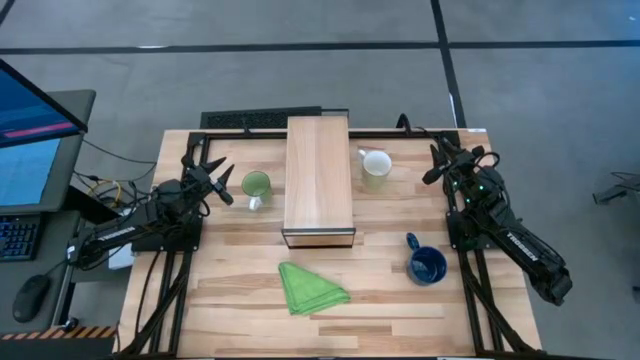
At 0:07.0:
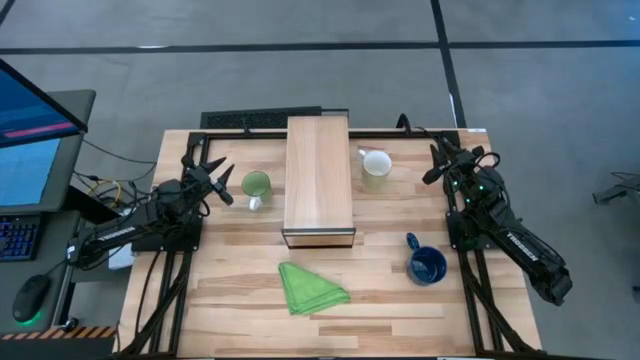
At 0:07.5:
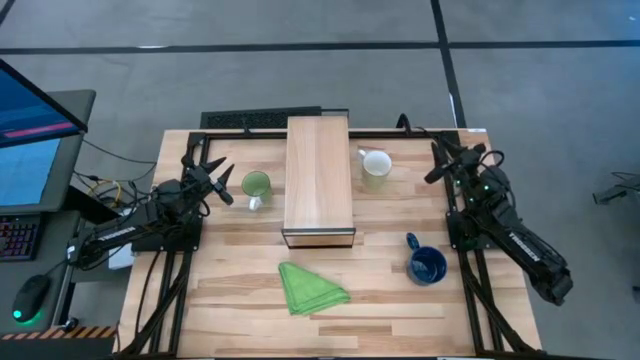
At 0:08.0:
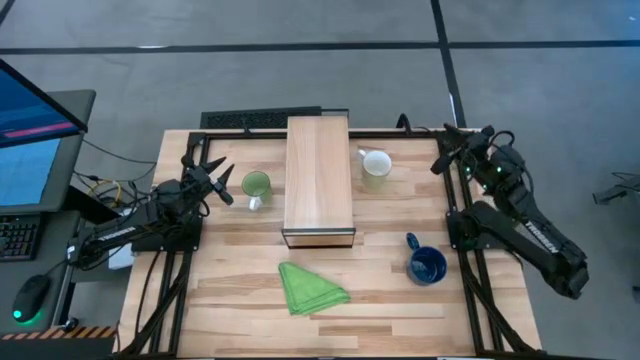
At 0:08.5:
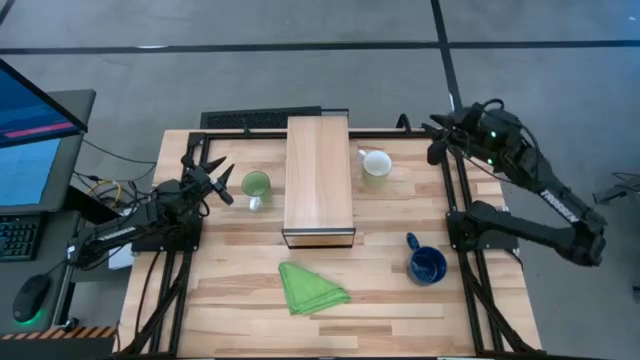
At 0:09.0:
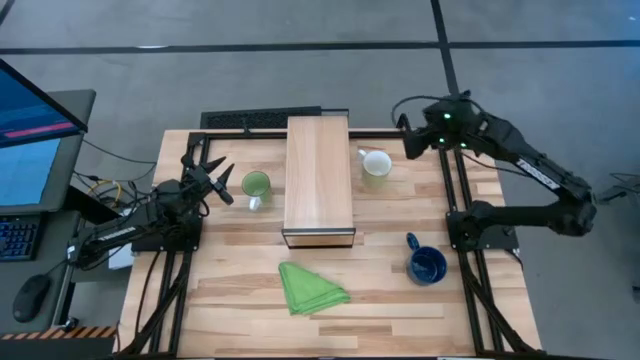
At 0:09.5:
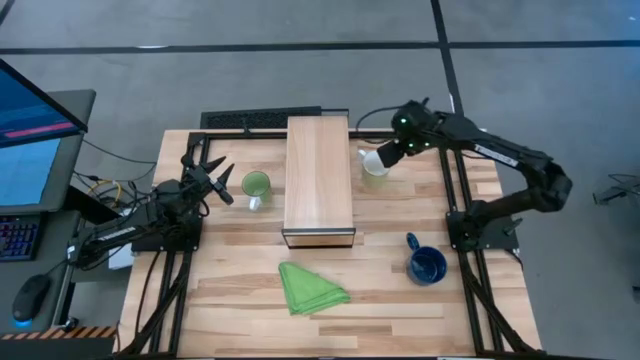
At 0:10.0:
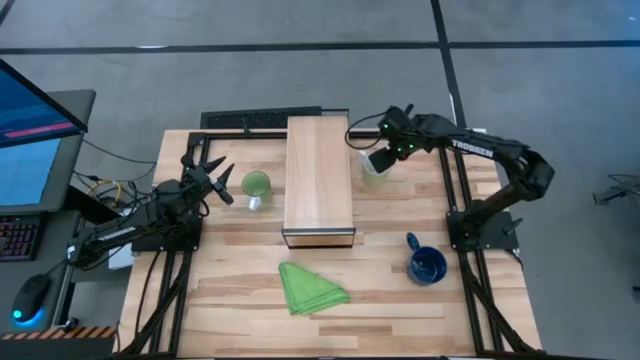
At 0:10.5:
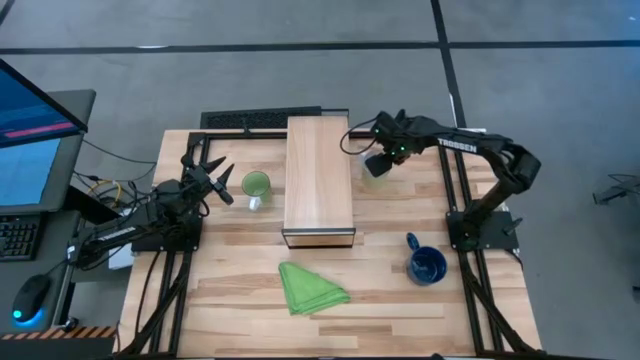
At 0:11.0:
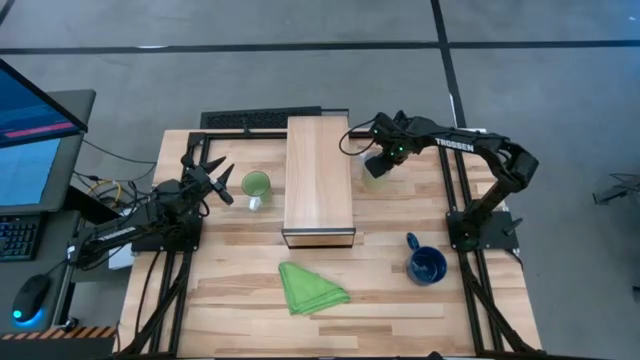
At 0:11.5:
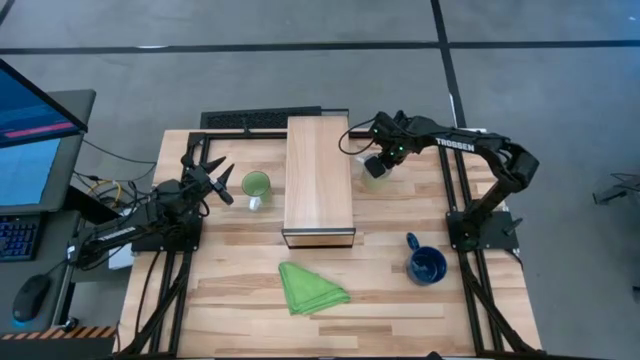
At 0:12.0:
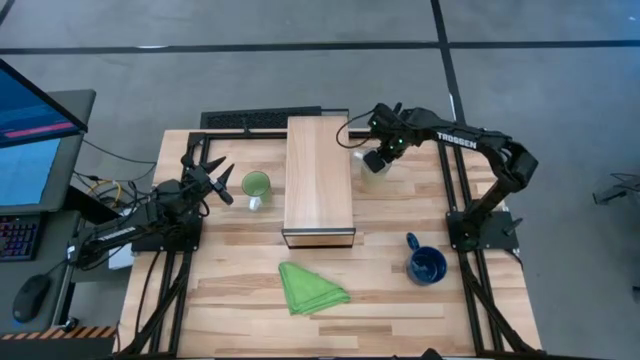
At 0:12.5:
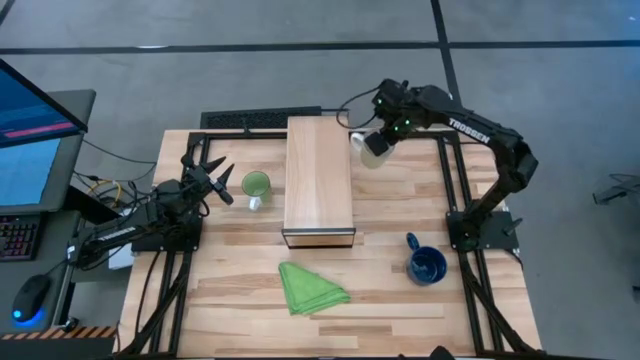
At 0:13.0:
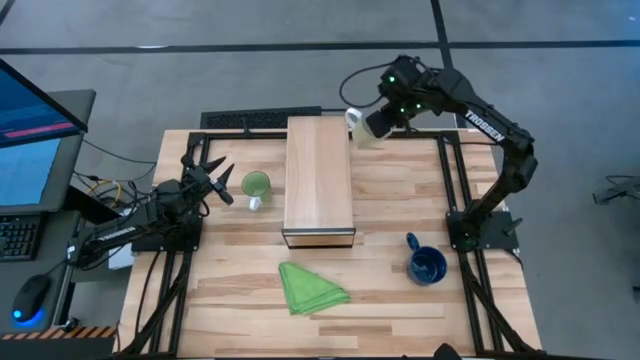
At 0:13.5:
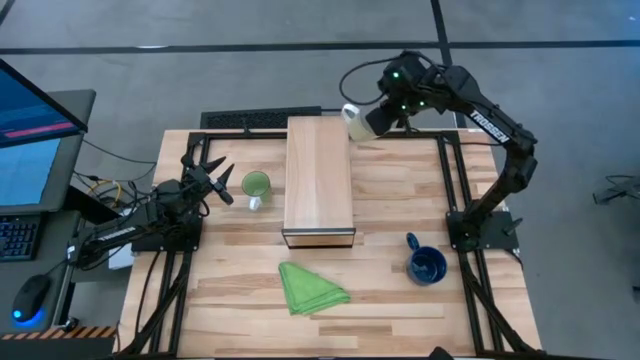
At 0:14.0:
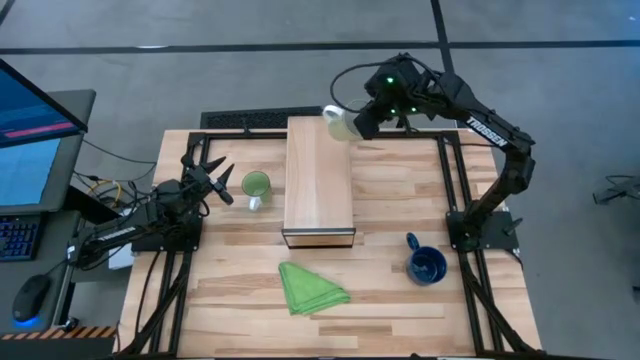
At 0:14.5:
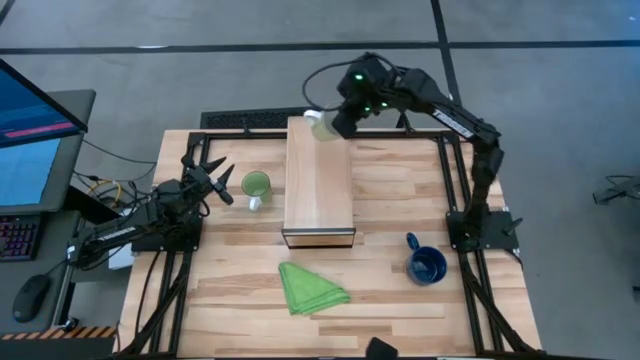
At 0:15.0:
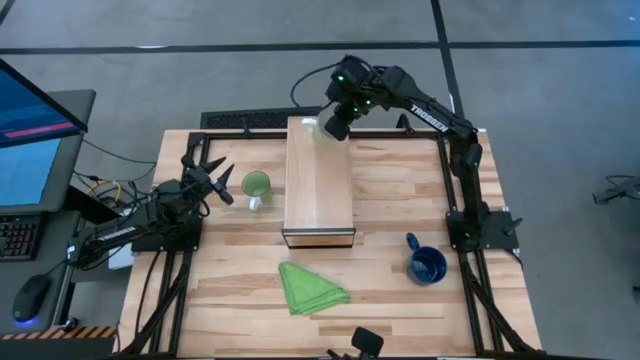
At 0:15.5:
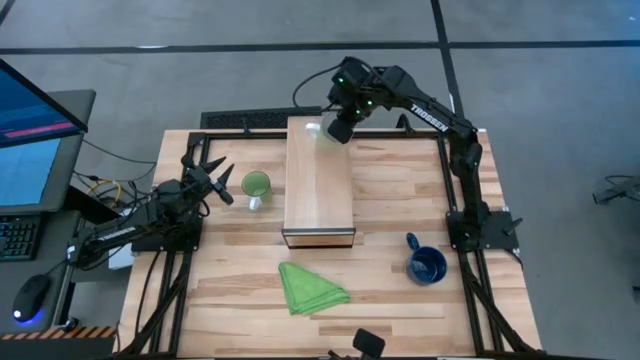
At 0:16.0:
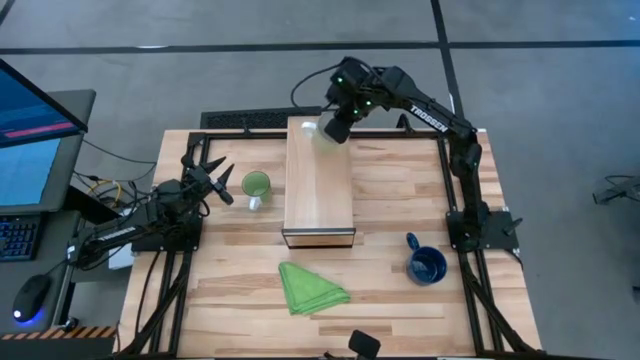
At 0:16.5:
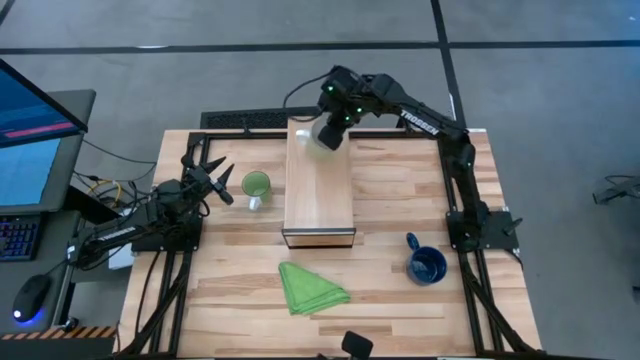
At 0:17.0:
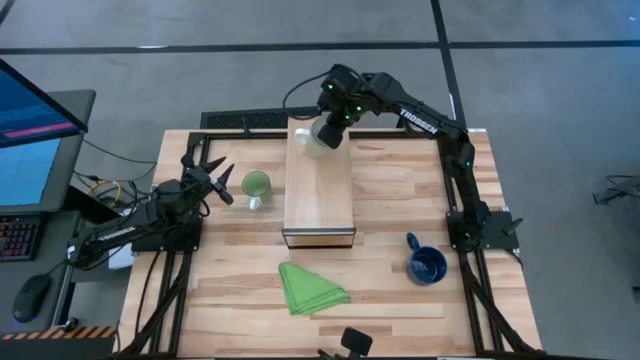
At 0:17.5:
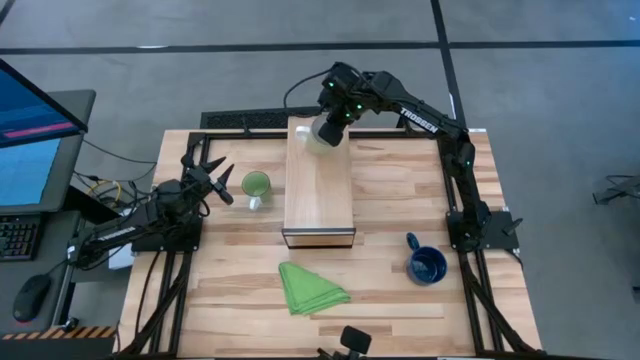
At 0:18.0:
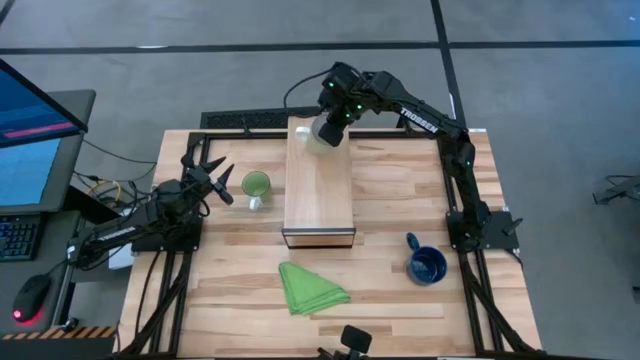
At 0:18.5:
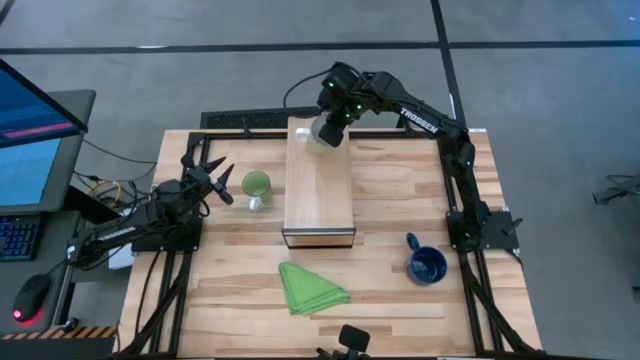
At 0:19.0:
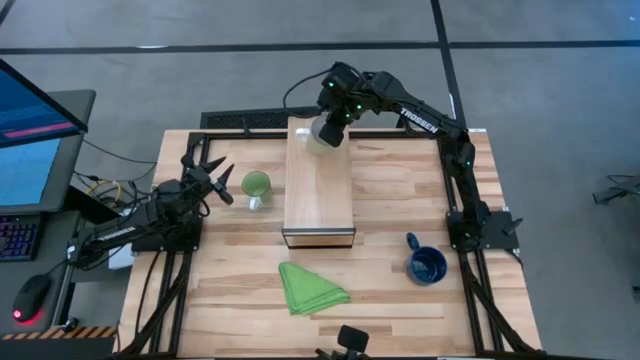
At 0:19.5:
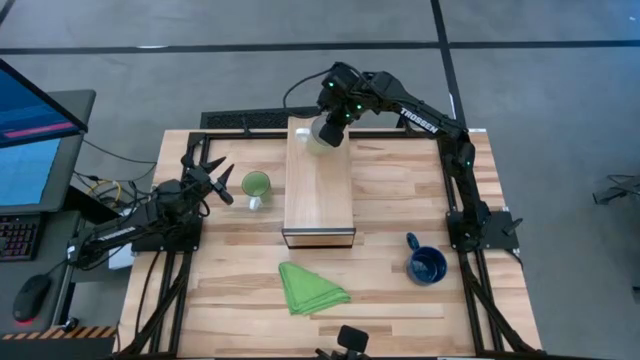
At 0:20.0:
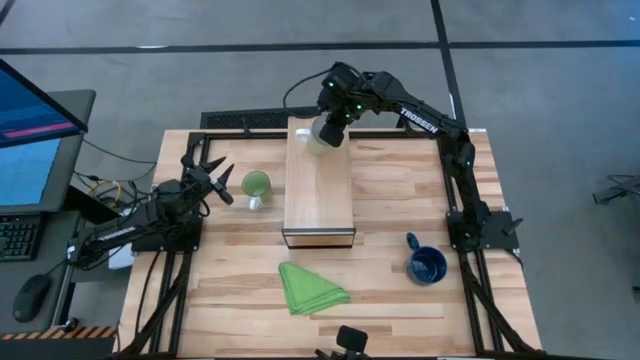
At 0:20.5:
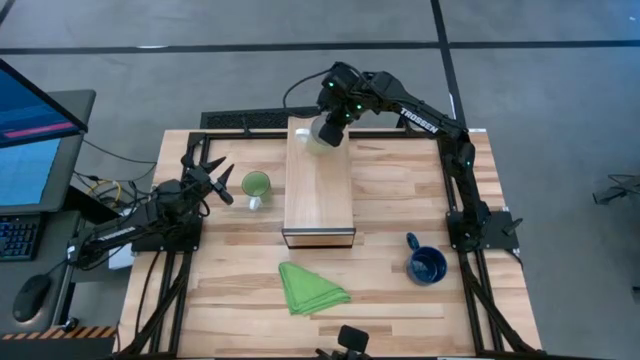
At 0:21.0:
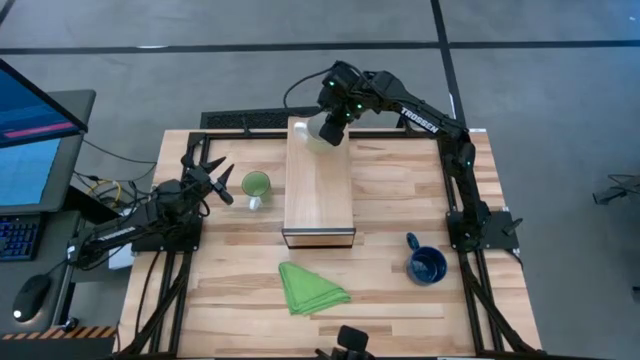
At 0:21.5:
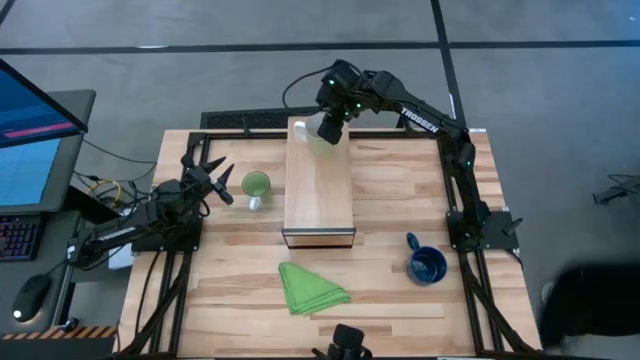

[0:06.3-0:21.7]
Task: Stack small to large cups/mugs on shelf
Put the light green mug on the shelf

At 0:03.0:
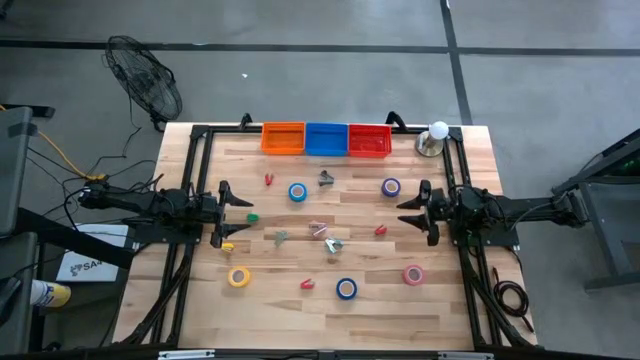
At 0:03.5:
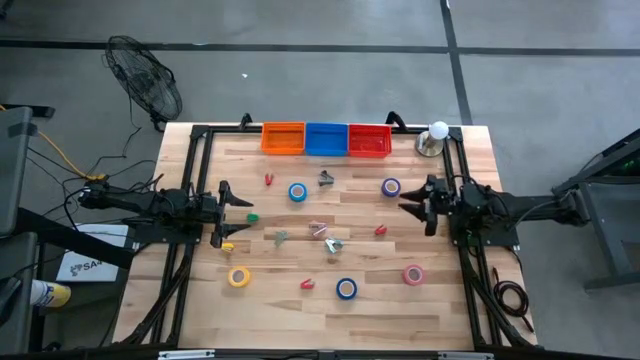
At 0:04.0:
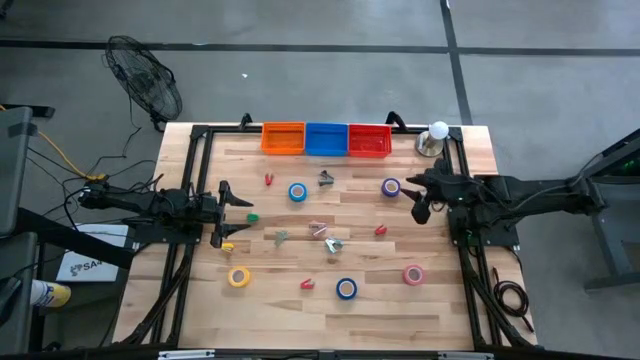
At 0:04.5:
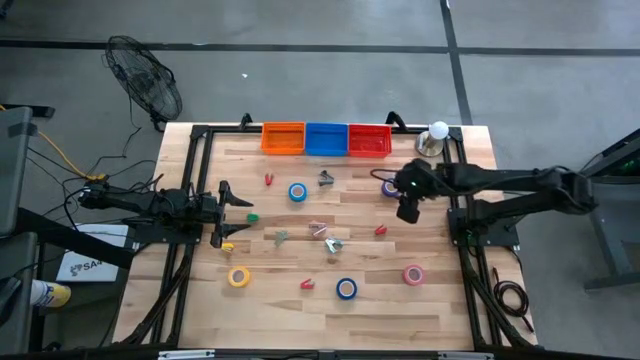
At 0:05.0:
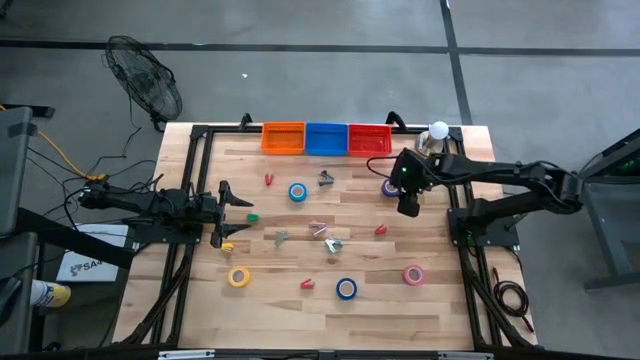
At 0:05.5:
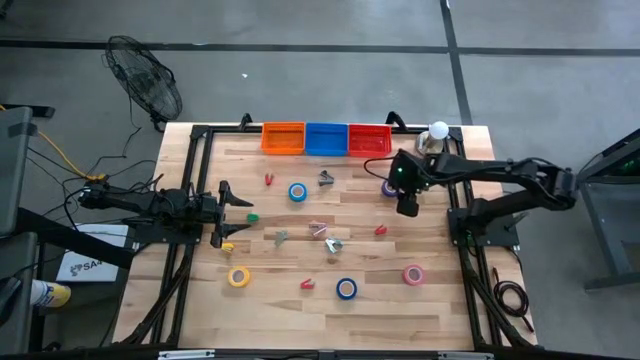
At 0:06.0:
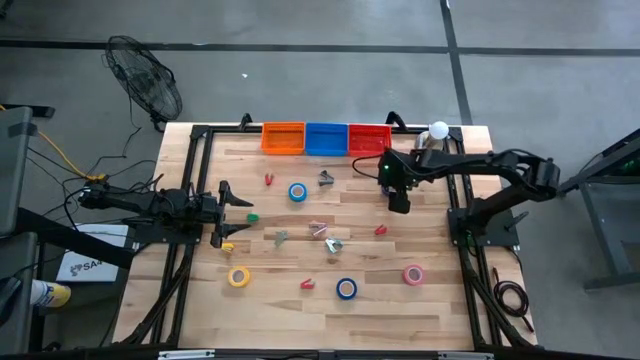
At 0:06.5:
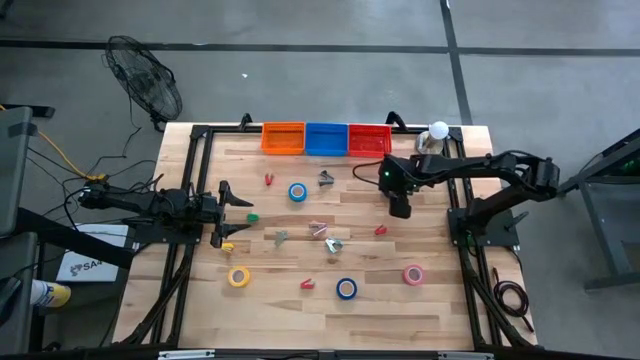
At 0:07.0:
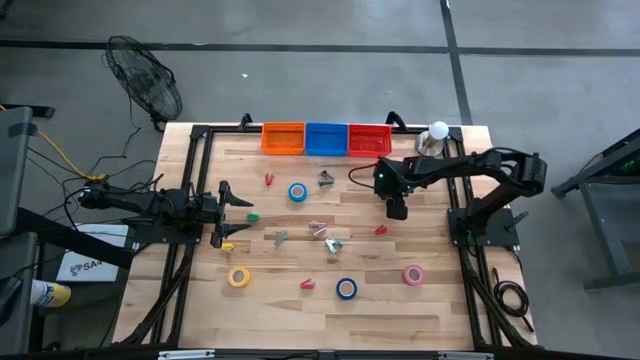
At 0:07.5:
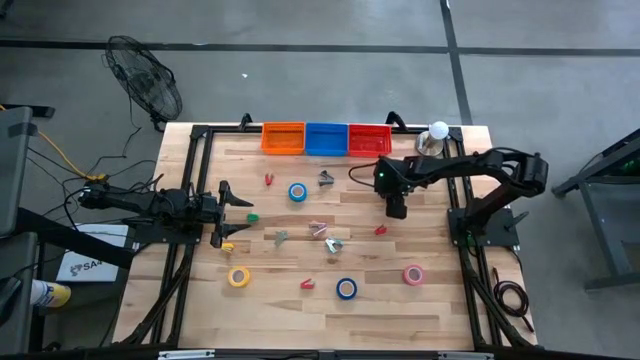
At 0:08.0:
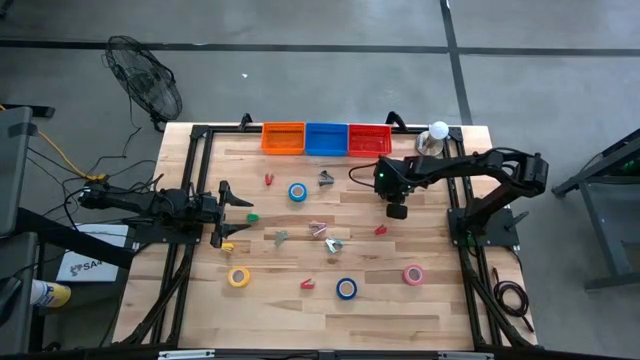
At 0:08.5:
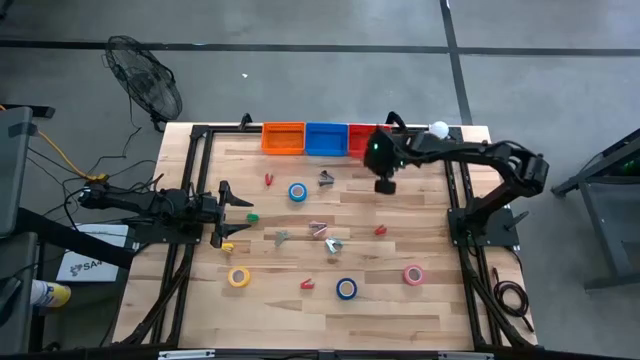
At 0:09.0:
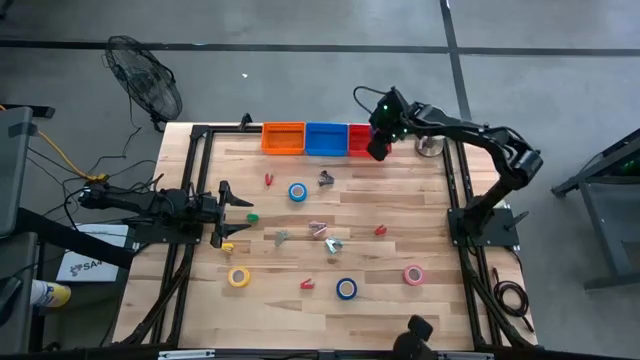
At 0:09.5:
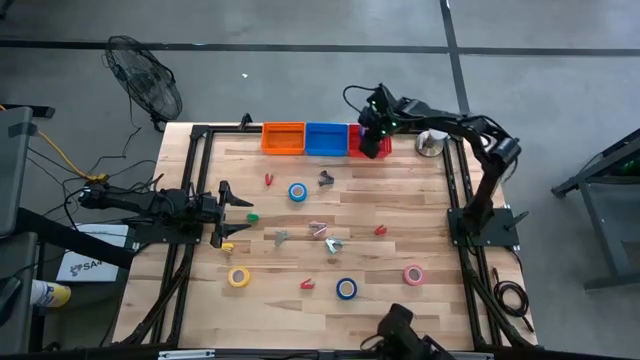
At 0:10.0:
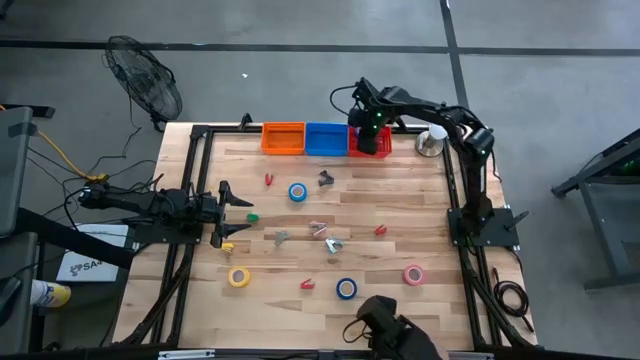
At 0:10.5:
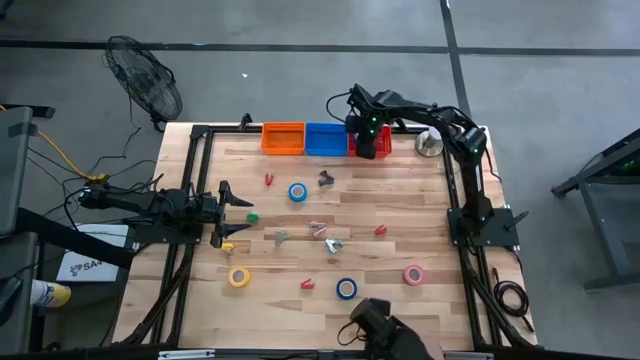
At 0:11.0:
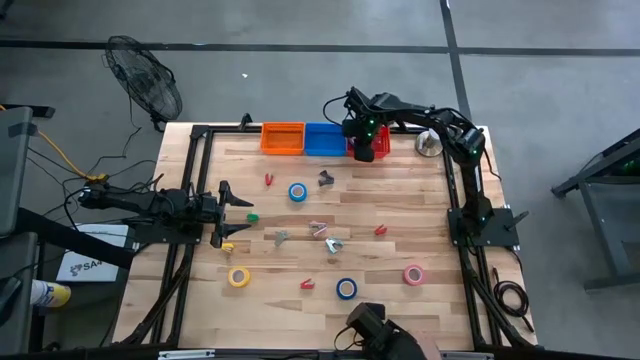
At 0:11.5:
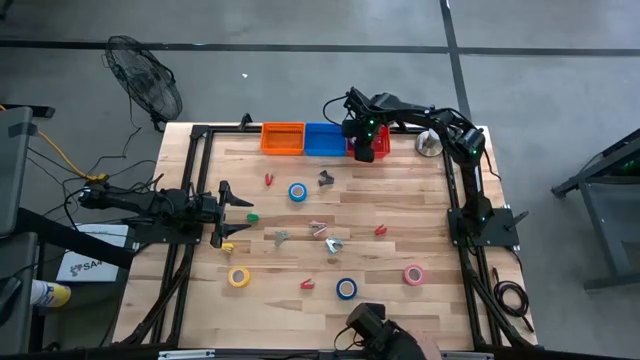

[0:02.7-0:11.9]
Task: Pick and place Stapler, Stapler remover, tape
Put the dark blue tape into the red bin
